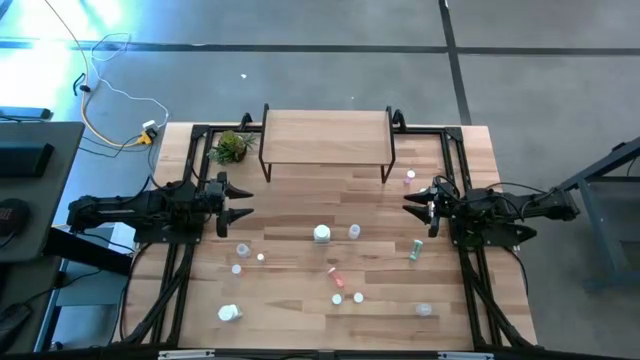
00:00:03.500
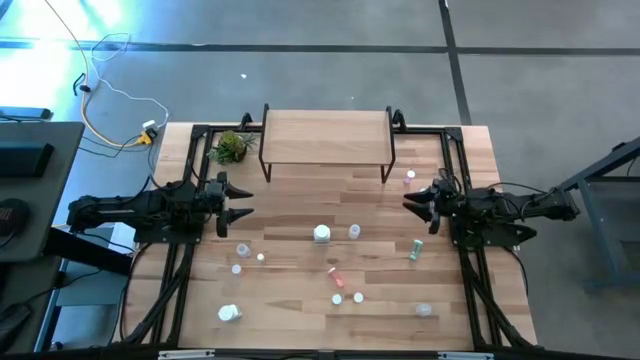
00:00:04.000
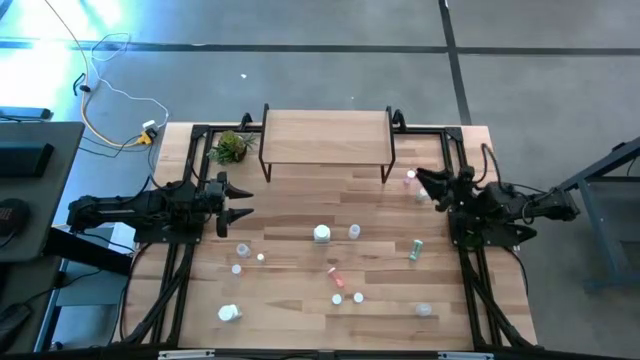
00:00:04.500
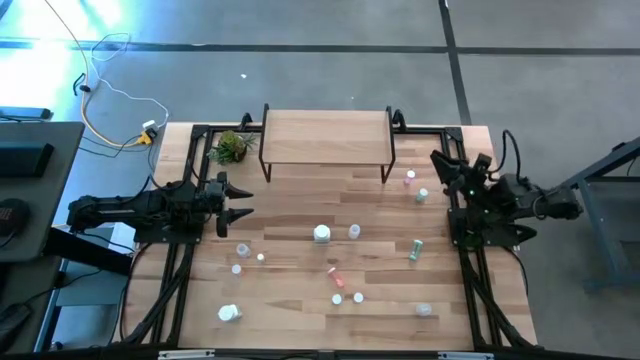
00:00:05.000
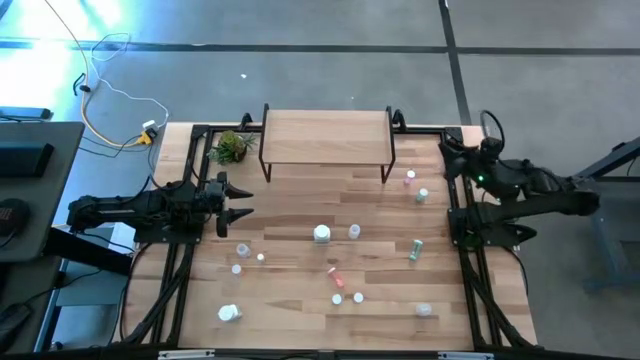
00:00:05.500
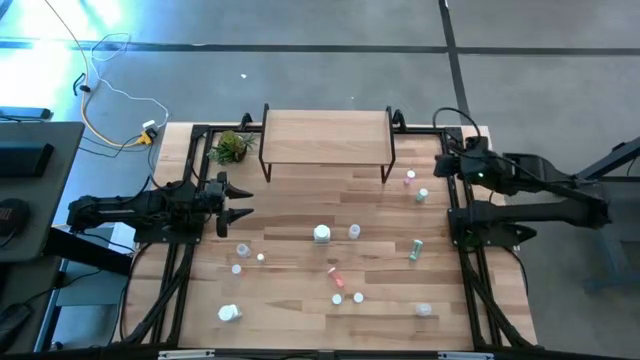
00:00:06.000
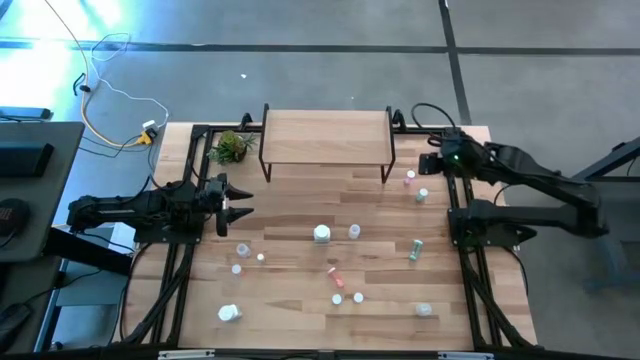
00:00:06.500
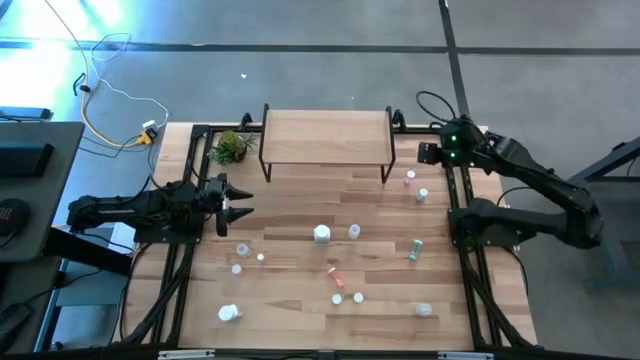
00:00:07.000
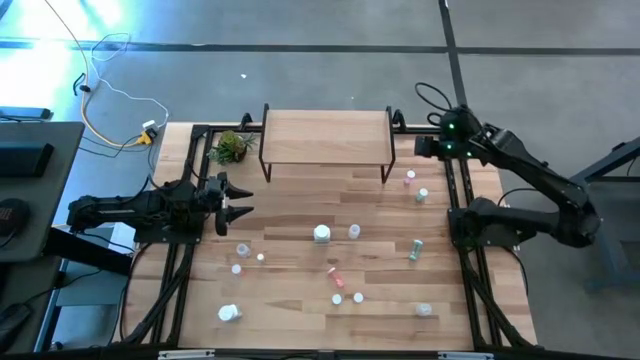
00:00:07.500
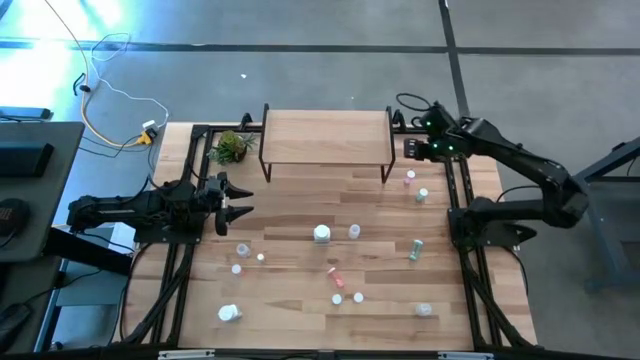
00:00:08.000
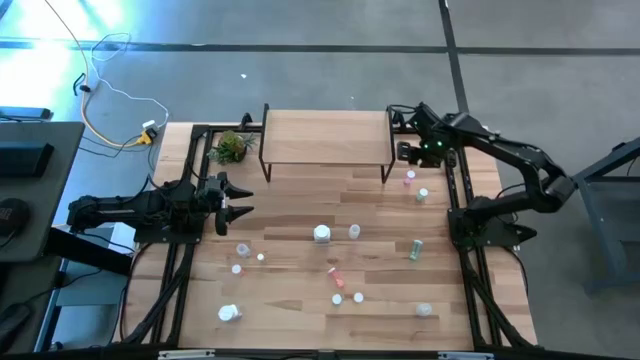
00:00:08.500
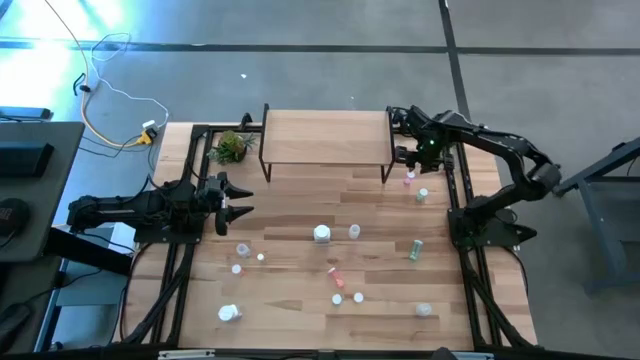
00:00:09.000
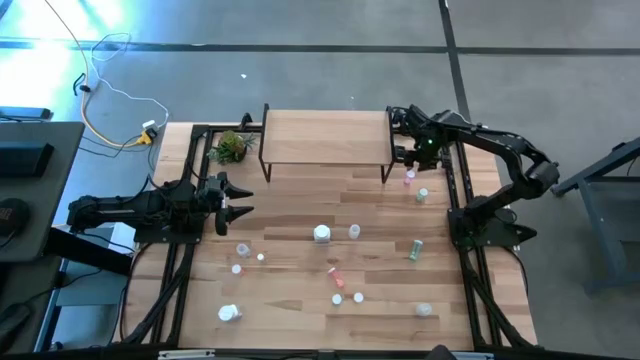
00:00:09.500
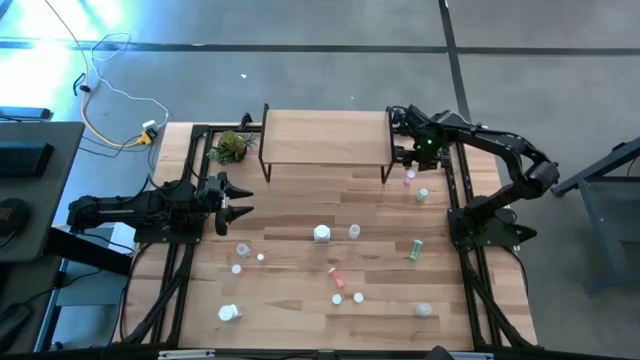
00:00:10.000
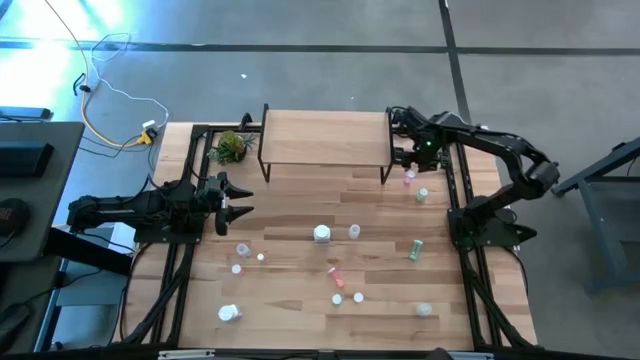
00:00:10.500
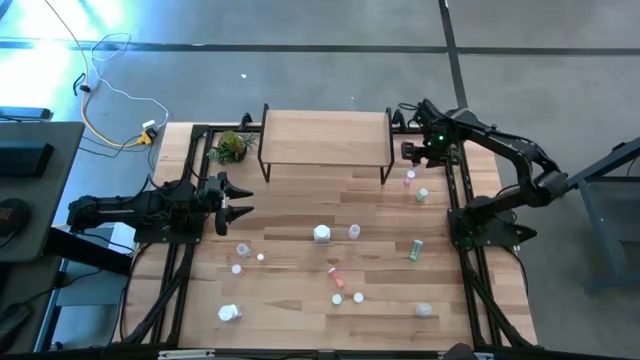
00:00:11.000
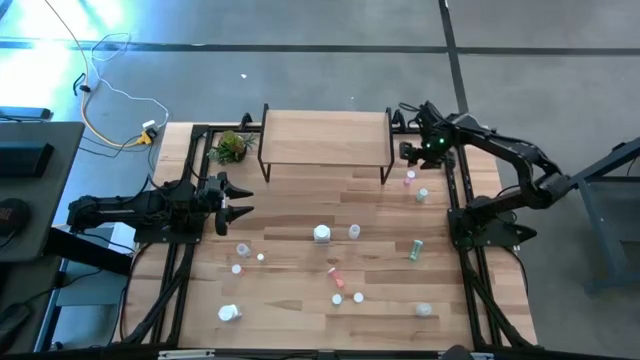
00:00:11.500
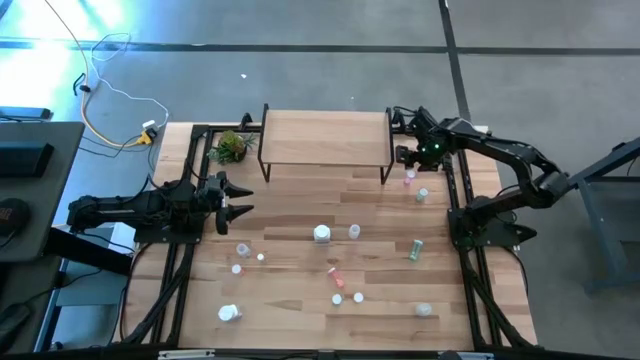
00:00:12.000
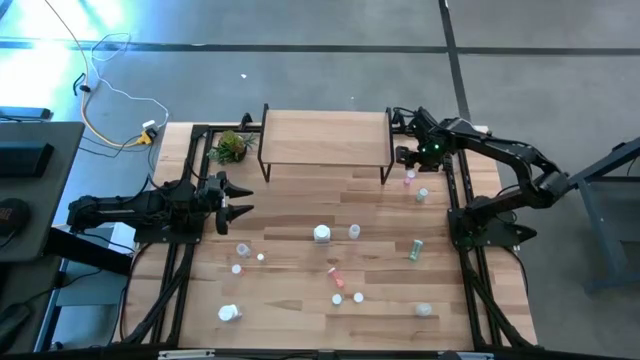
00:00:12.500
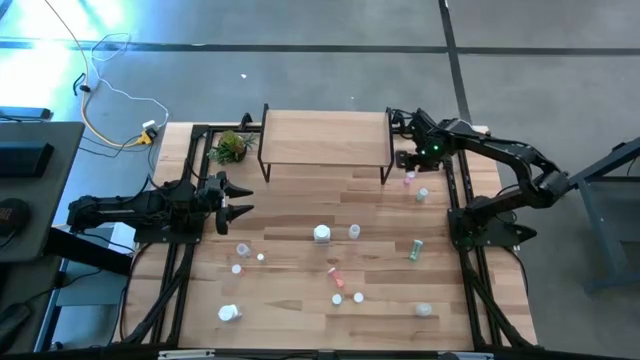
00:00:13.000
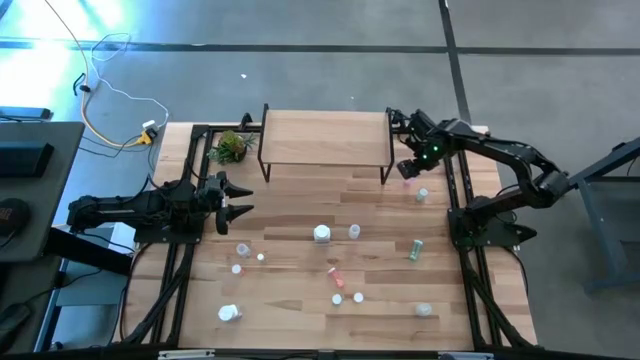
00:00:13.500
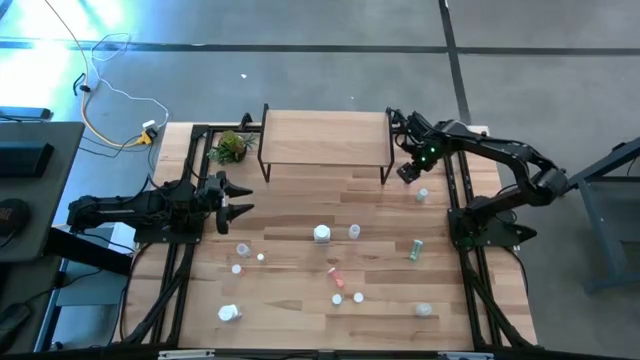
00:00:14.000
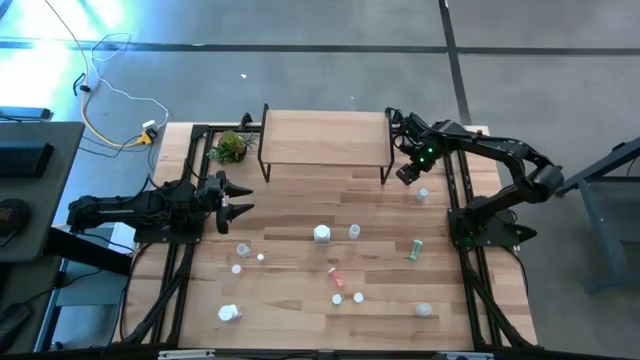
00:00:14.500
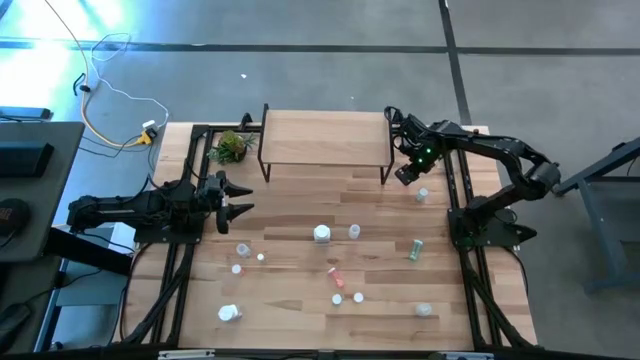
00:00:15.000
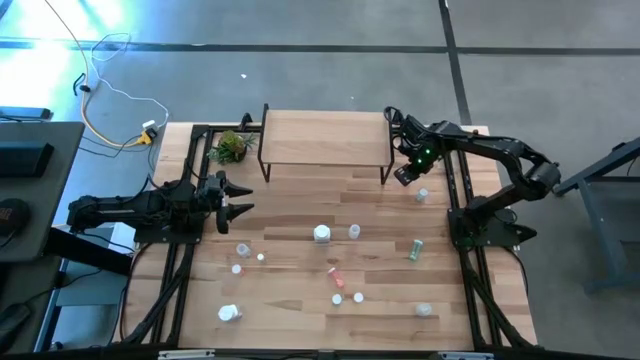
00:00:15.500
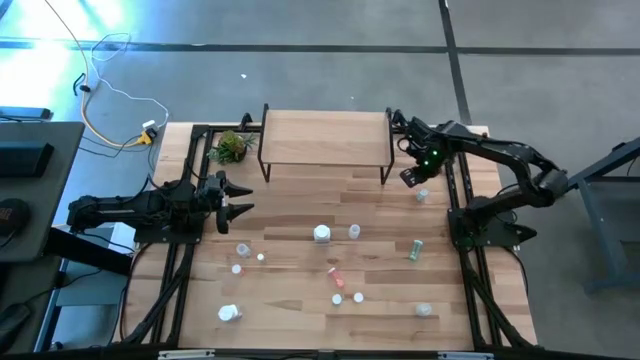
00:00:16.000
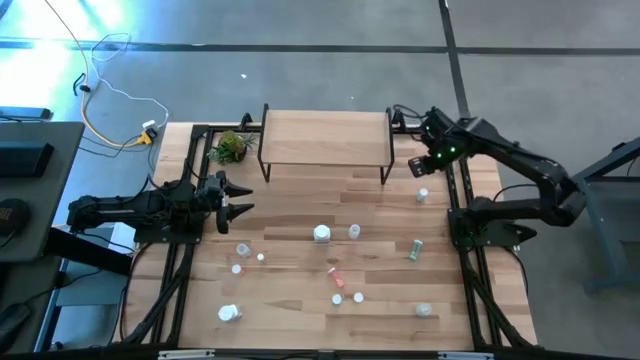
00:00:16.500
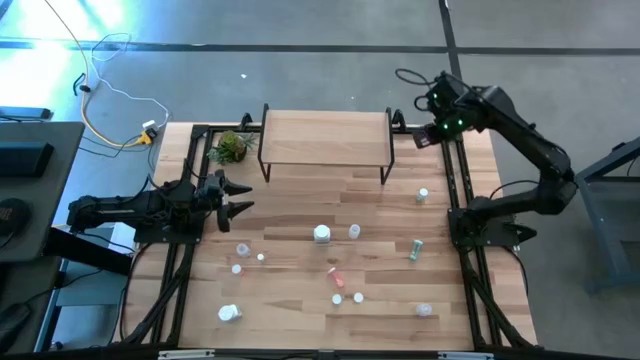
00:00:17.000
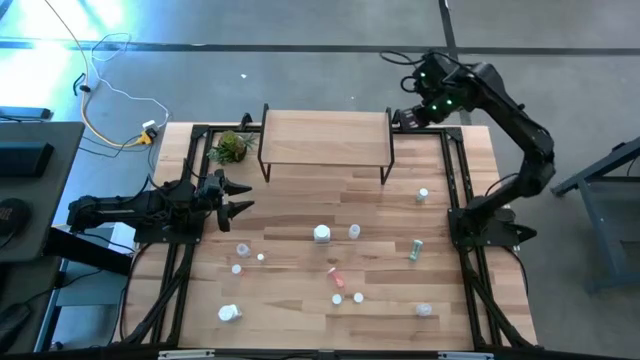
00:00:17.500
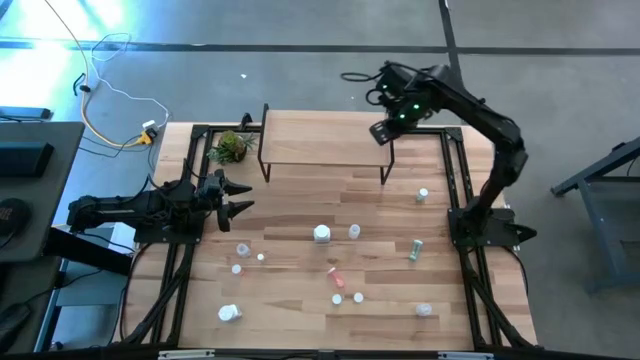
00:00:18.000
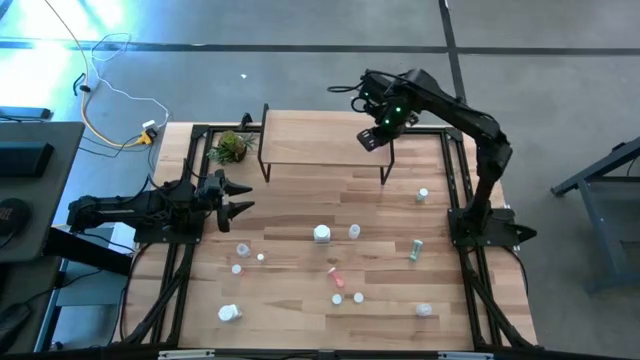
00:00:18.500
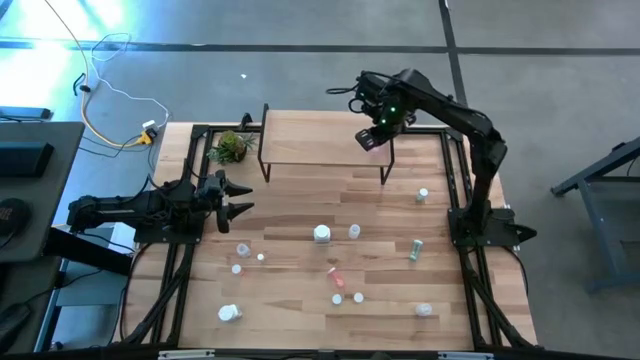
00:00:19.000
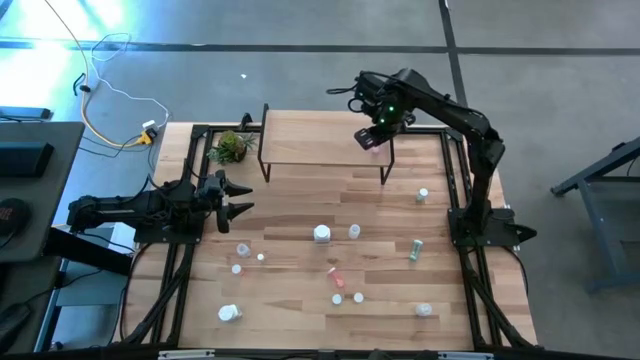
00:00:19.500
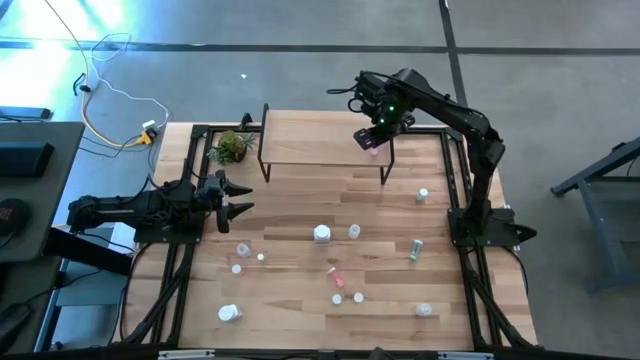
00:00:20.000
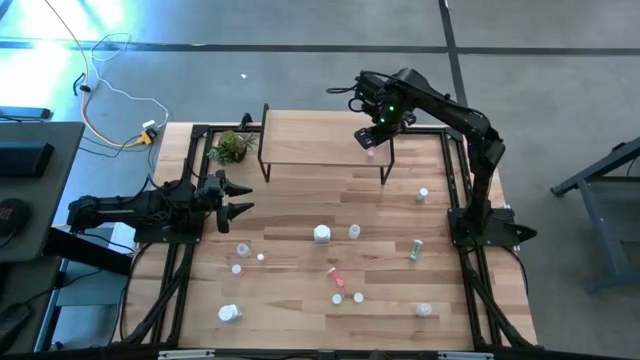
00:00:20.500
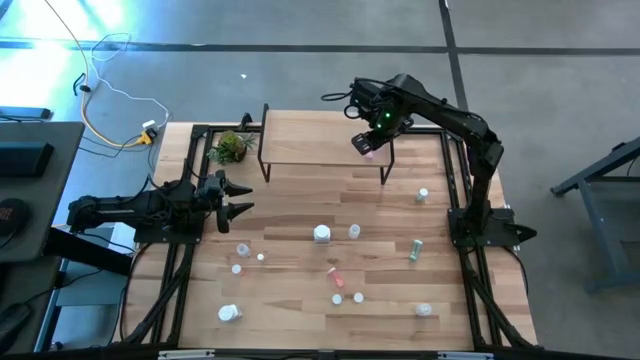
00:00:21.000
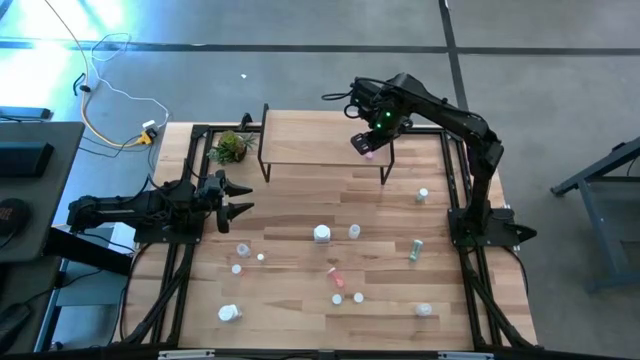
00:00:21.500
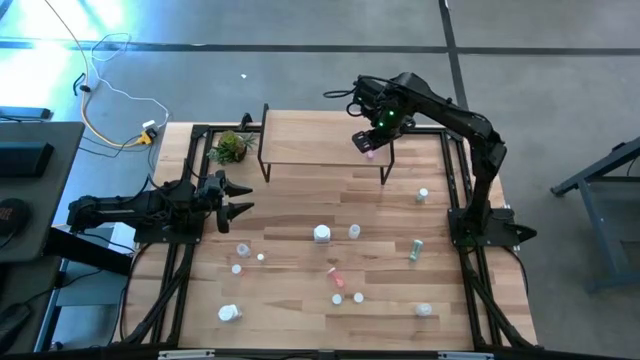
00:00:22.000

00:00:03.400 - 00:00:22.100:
Task: Pick and place medicine bottles onto shelf by color
Put the pink pill bottle on the shelf
